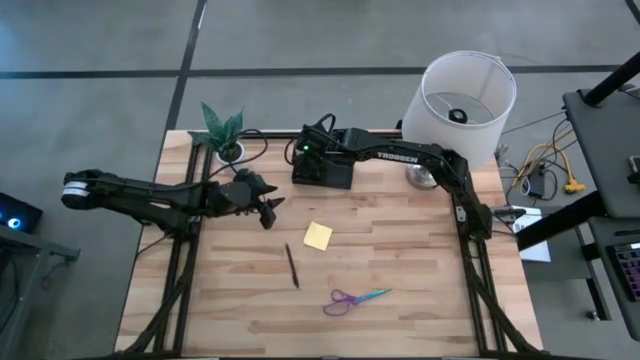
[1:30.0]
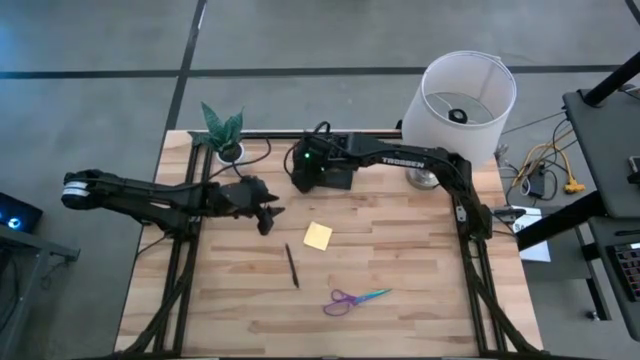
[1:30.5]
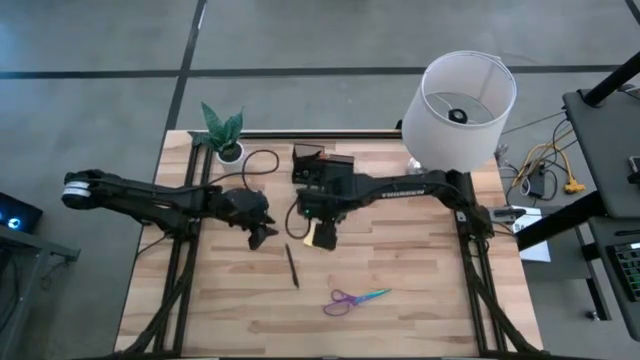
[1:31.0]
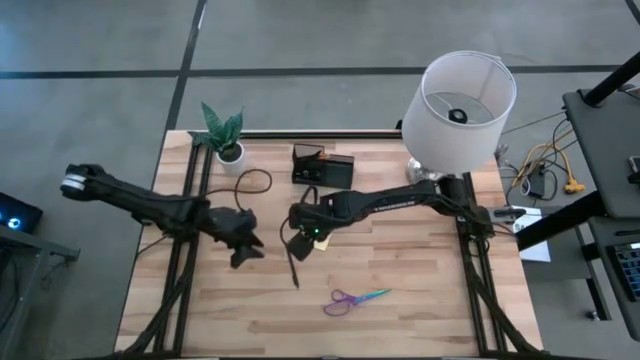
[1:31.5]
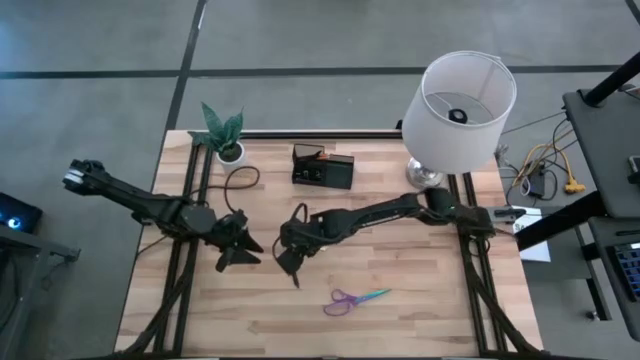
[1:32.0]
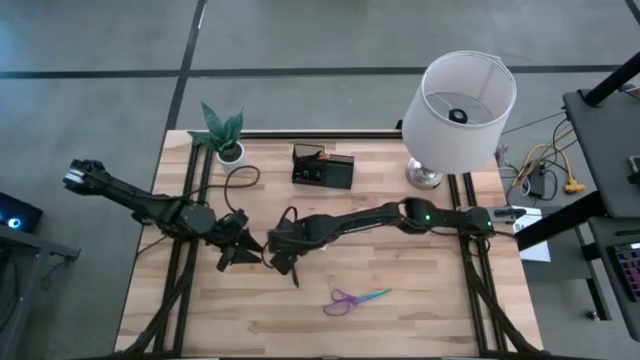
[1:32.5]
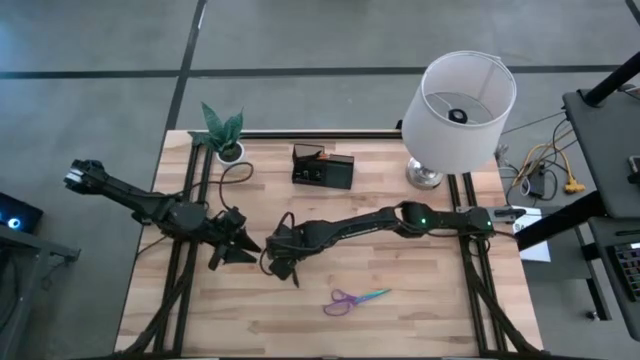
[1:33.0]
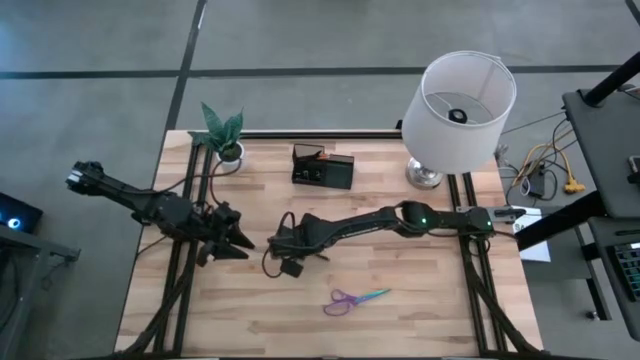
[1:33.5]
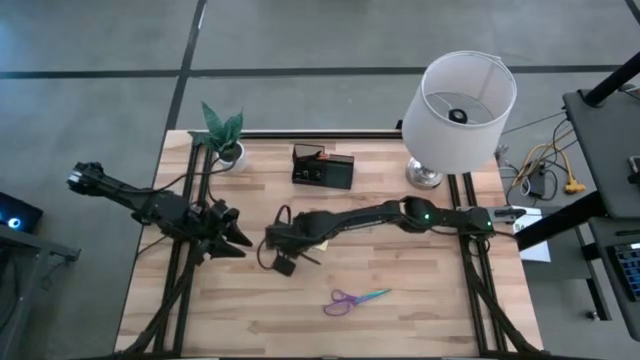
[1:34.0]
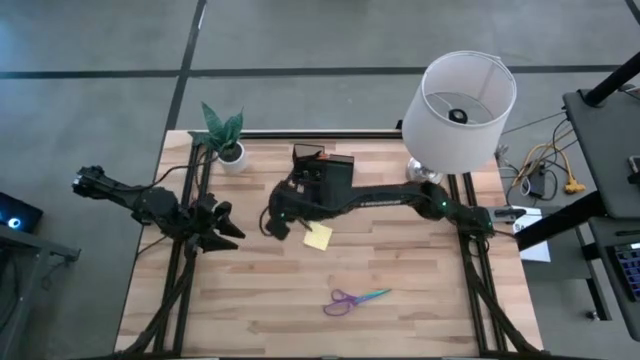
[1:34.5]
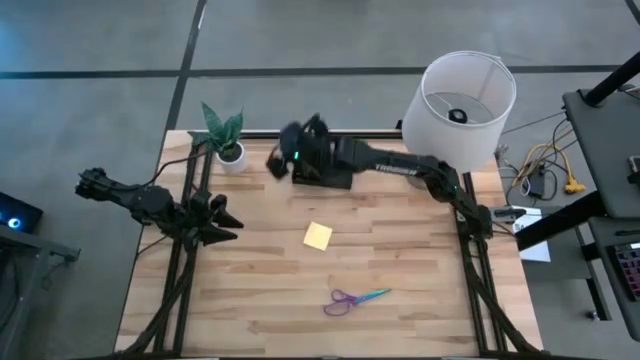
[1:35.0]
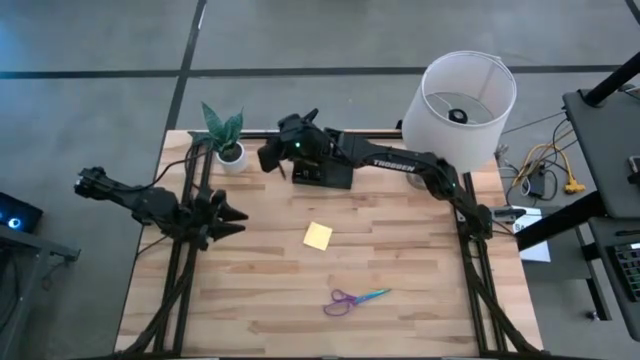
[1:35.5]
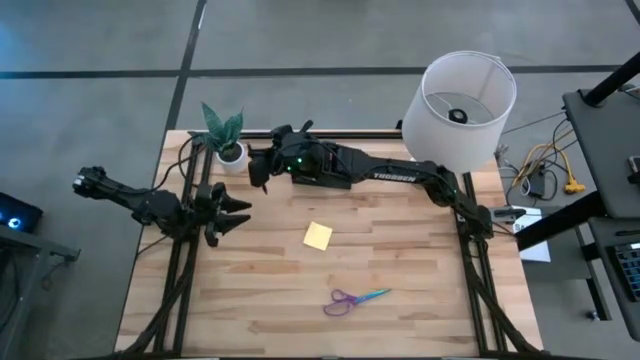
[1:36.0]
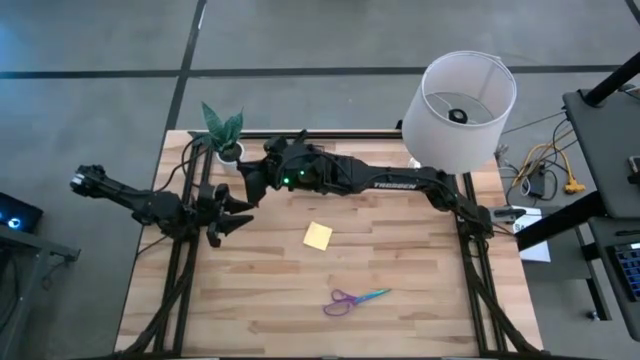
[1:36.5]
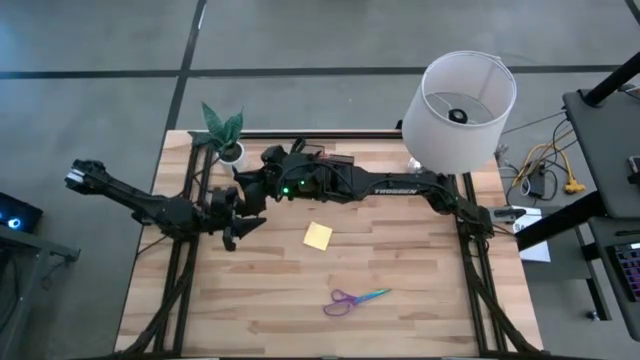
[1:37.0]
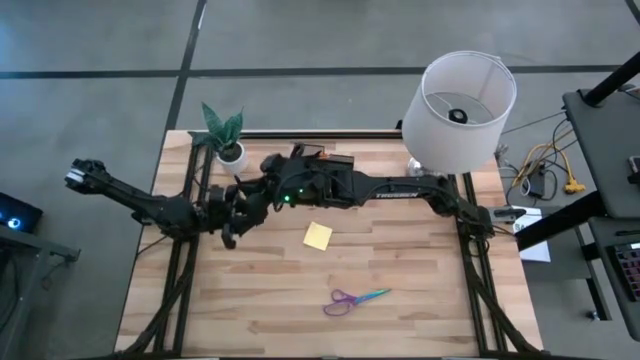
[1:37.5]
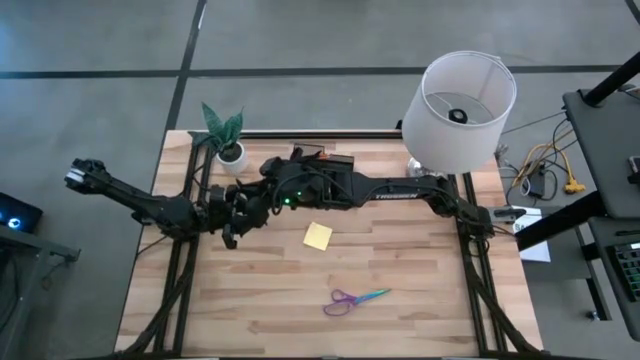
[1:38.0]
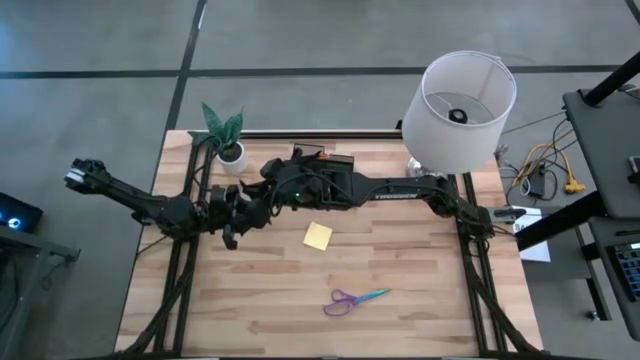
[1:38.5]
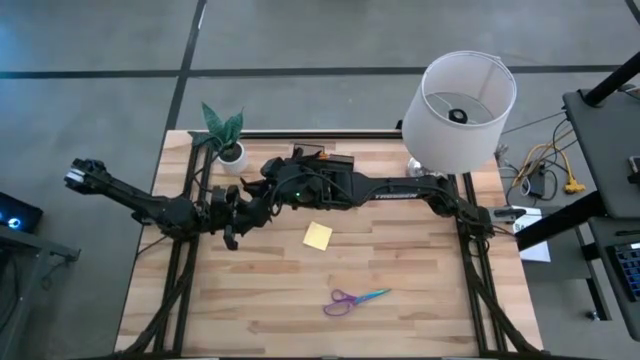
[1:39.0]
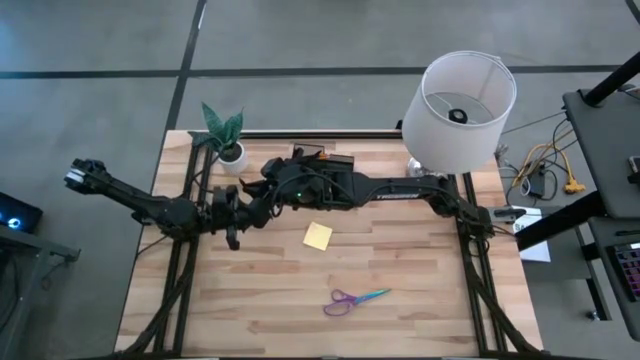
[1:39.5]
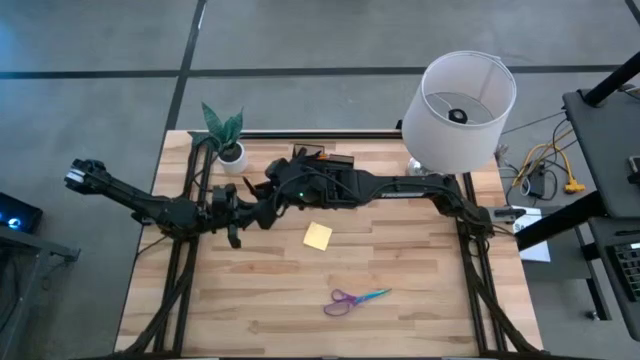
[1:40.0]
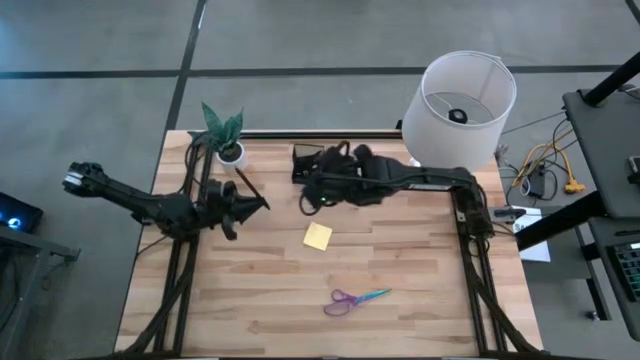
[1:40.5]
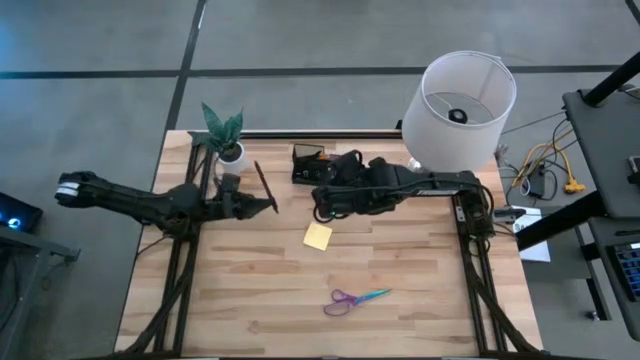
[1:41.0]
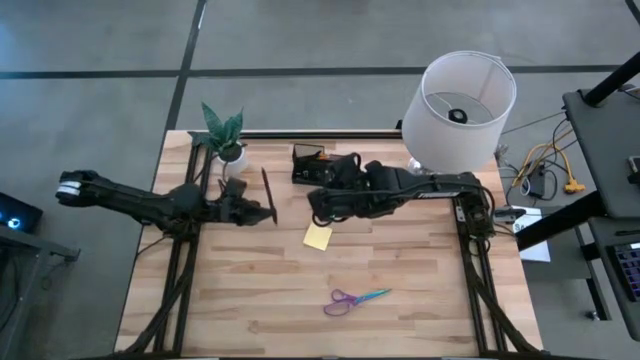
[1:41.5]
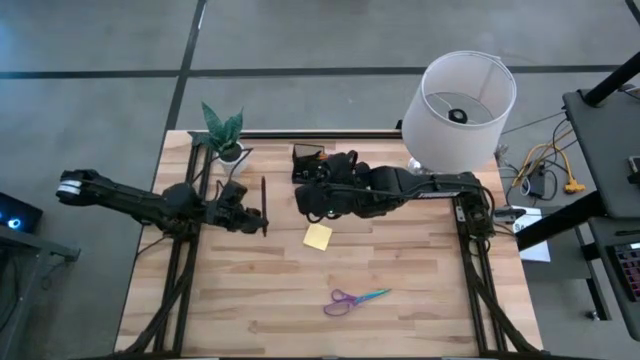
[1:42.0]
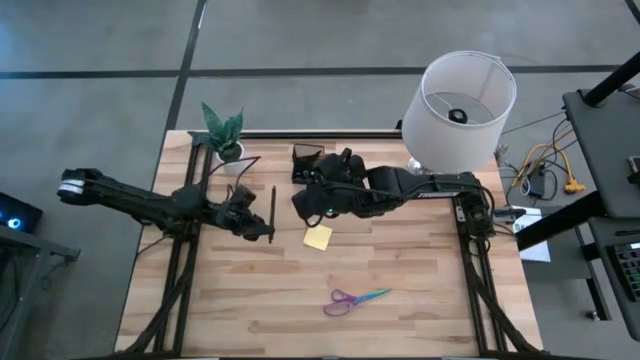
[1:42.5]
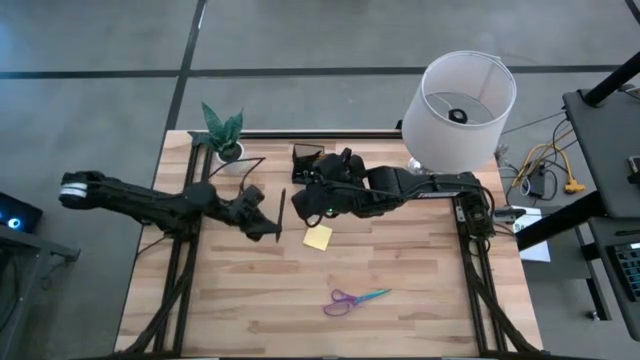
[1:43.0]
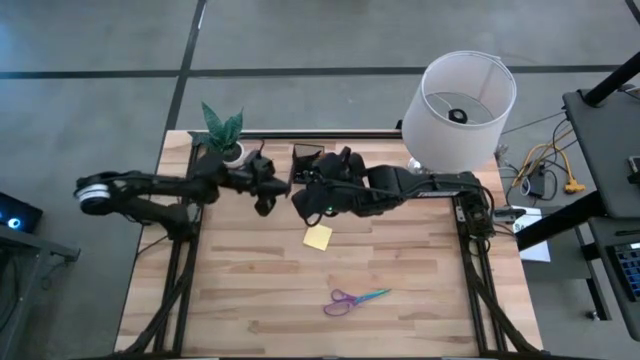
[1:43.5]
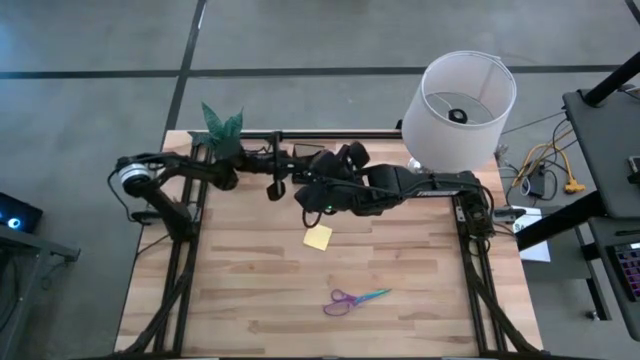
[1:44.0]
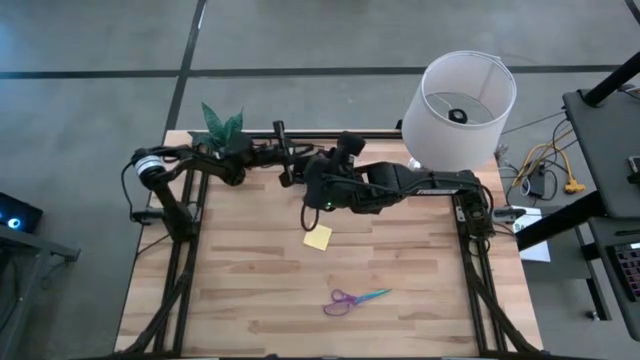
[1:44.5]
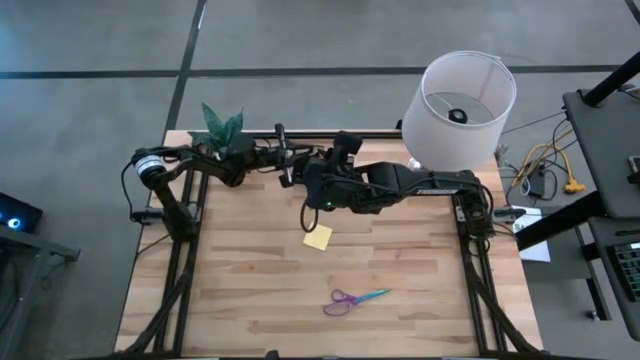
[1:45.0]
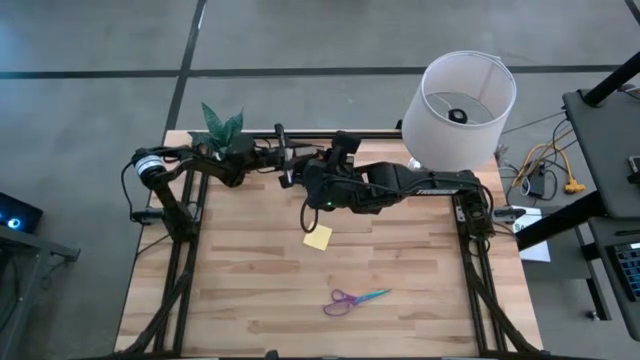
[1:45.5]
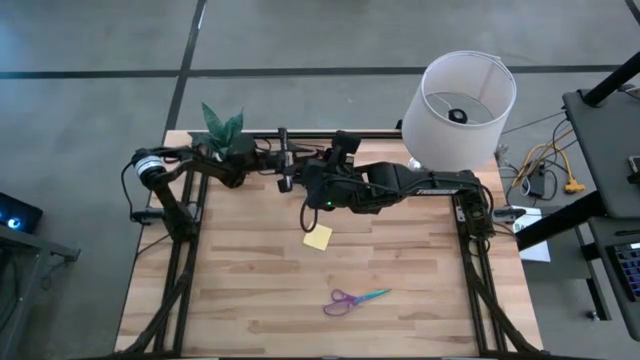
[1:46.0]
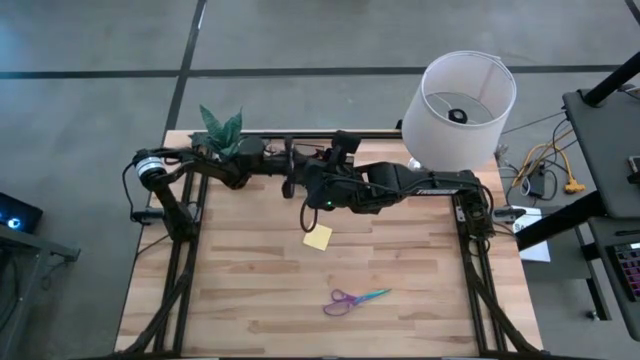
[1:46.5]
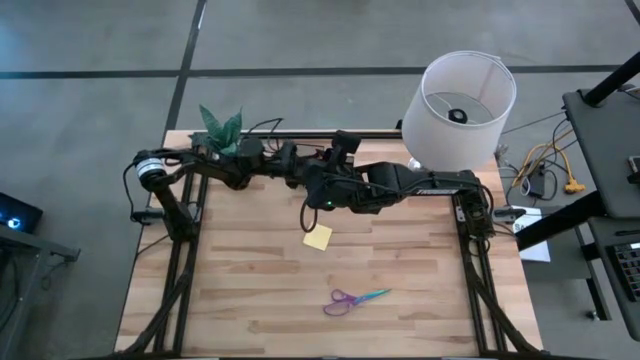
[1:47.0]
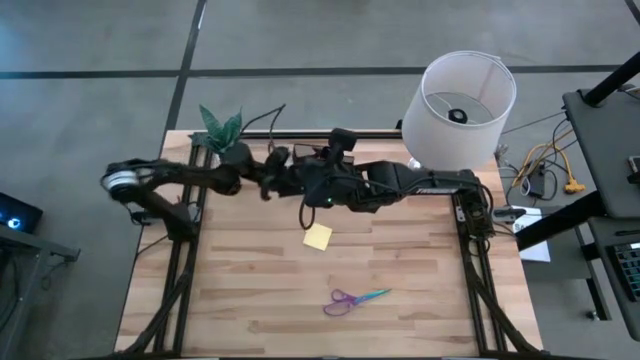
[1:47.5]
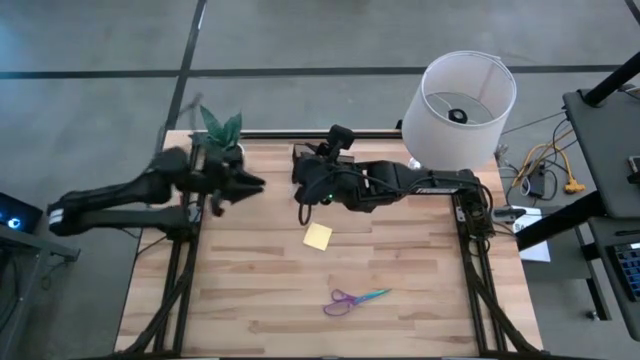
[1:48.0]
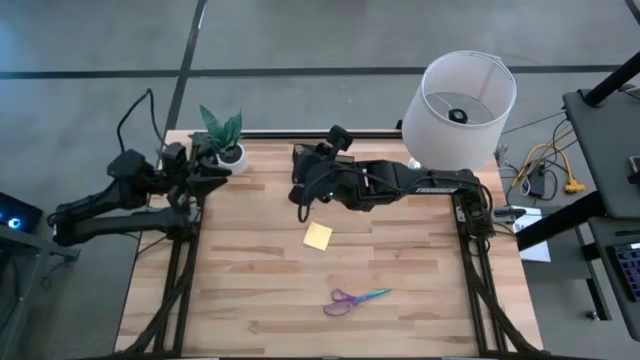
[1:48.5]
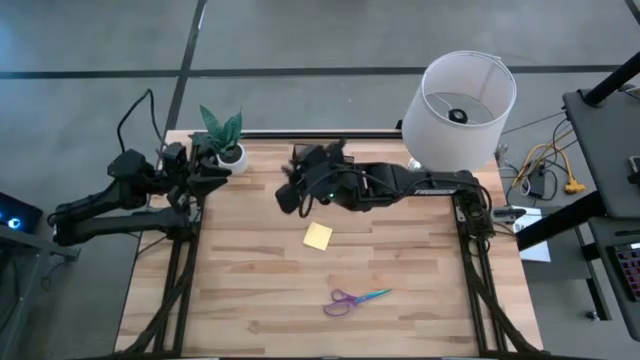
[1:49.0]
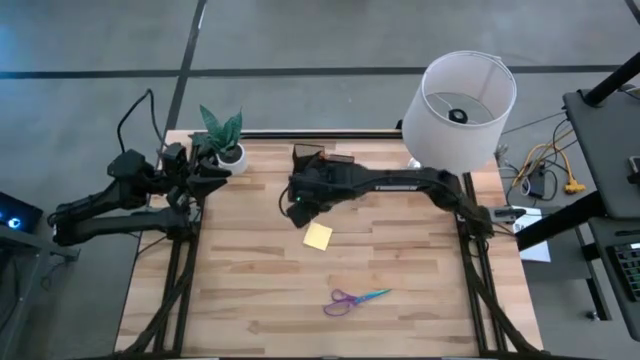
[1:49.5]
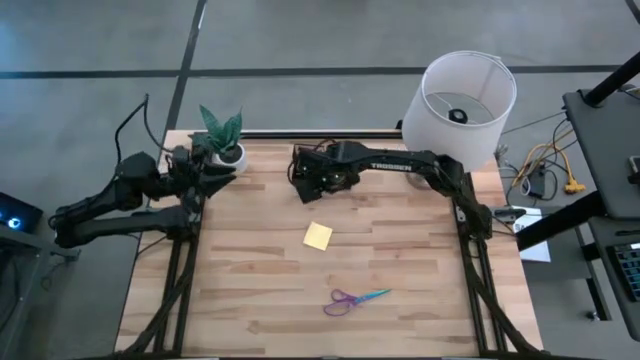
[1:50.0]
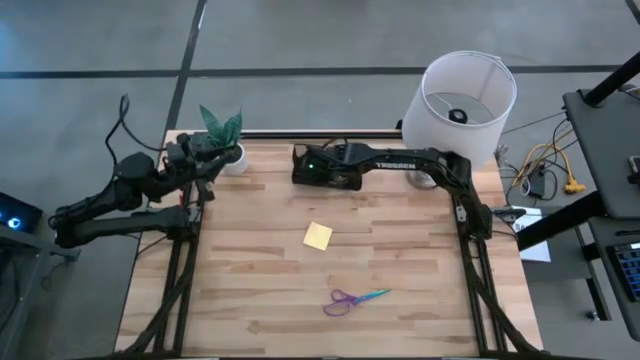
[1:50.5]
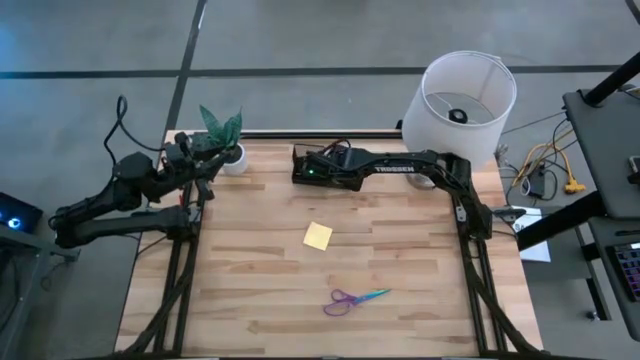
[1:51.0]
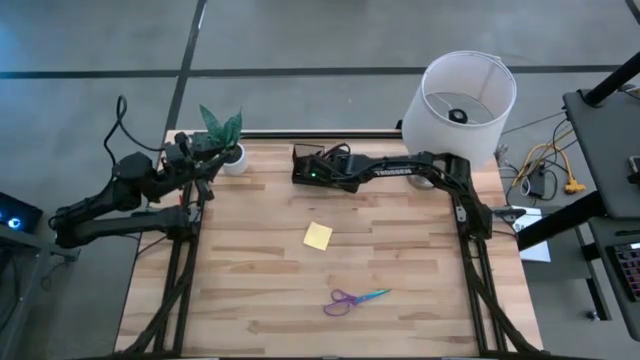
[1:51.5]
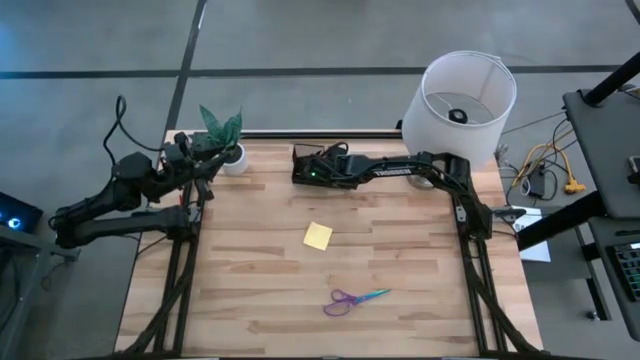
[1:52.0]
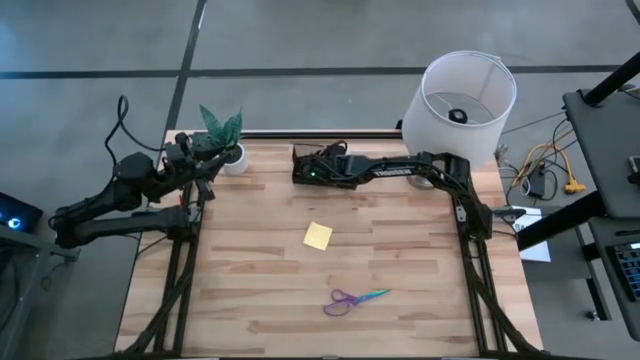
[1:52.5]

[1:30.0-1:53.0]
Task: Pick and place office supplies into organizer
Put the black pen into the black desk organizer
